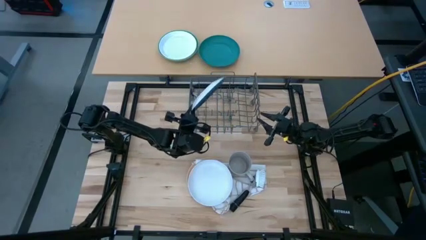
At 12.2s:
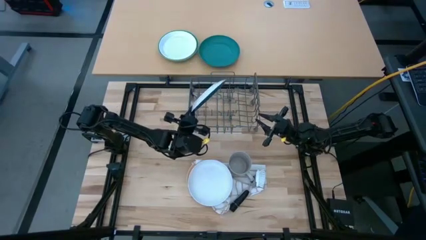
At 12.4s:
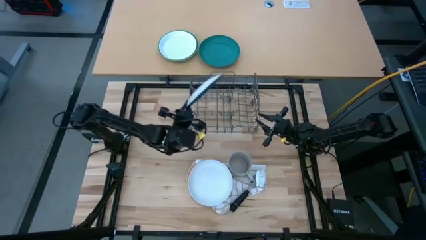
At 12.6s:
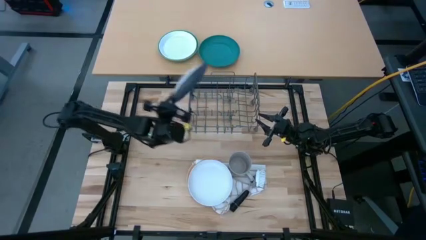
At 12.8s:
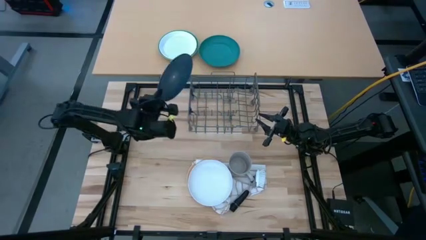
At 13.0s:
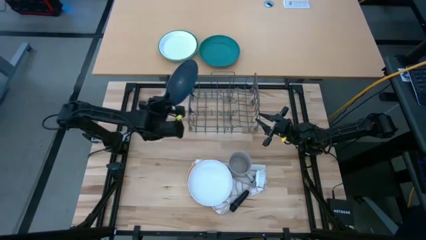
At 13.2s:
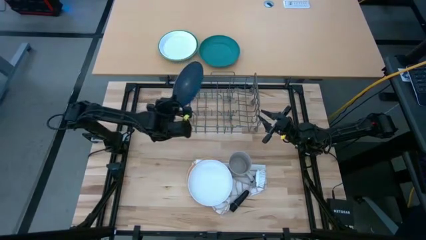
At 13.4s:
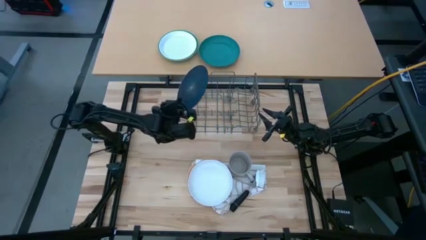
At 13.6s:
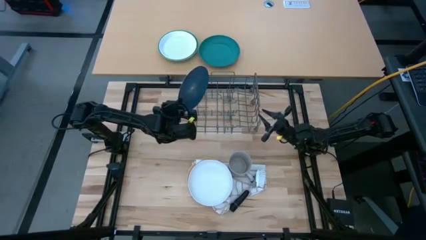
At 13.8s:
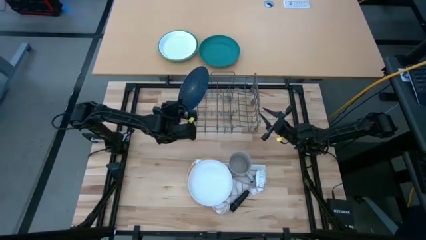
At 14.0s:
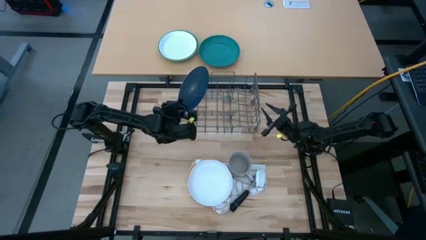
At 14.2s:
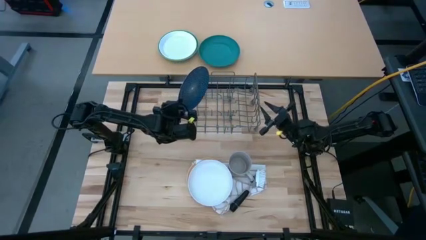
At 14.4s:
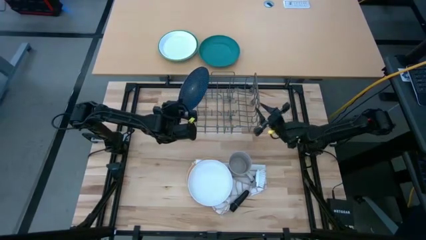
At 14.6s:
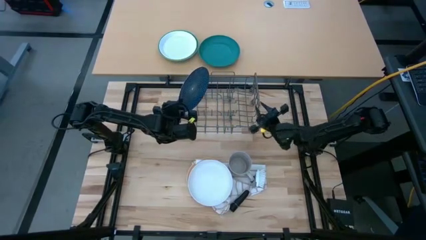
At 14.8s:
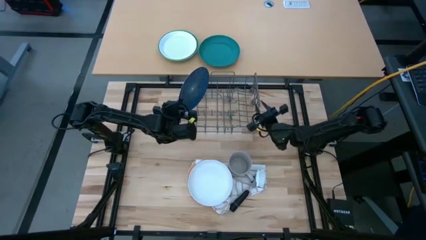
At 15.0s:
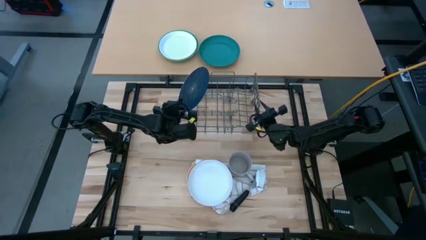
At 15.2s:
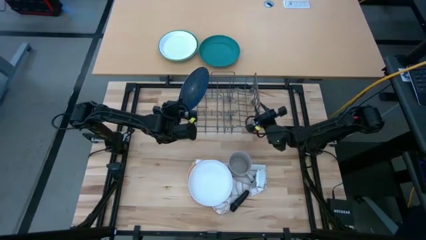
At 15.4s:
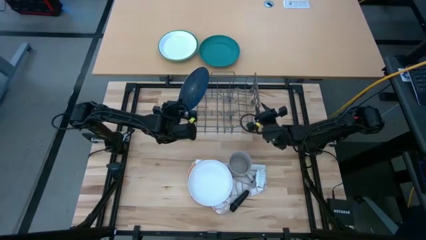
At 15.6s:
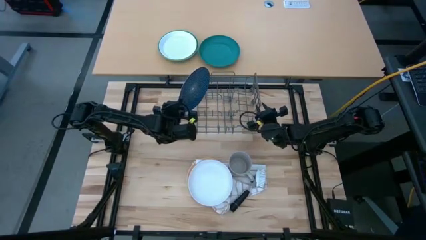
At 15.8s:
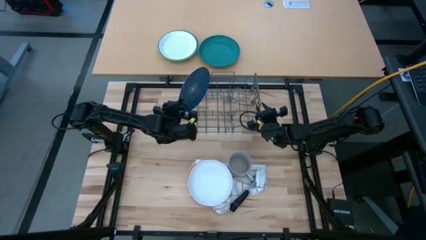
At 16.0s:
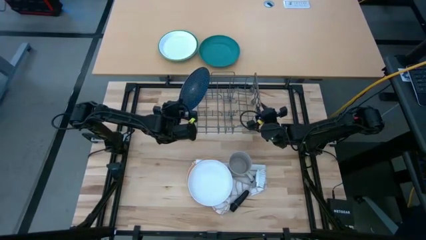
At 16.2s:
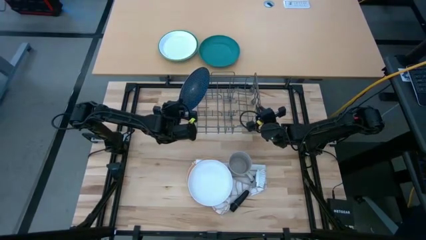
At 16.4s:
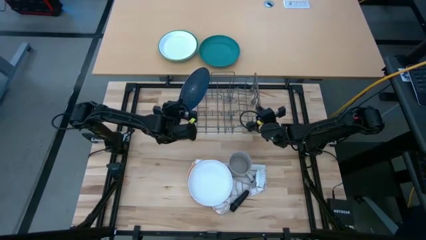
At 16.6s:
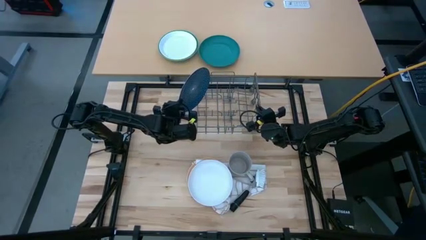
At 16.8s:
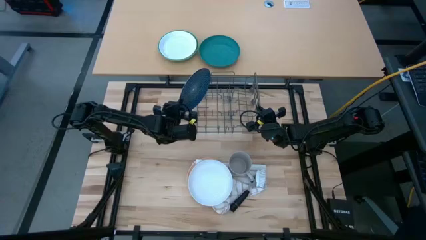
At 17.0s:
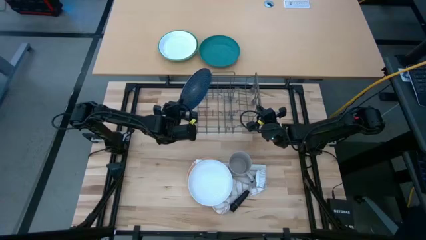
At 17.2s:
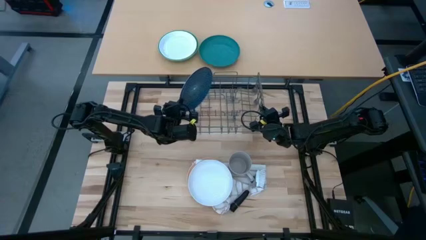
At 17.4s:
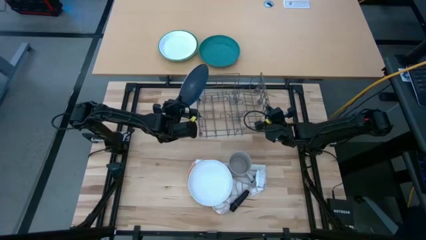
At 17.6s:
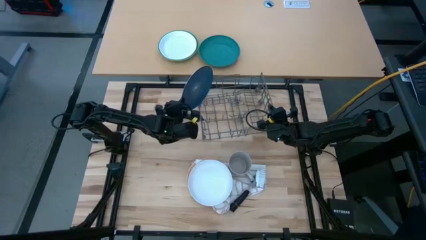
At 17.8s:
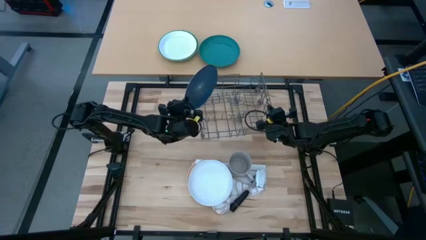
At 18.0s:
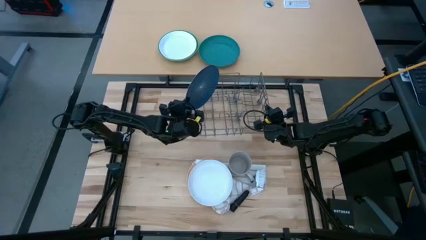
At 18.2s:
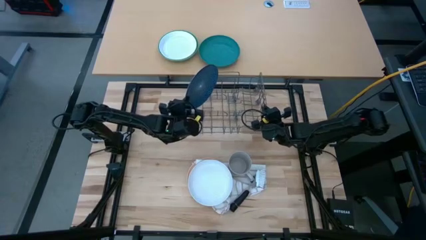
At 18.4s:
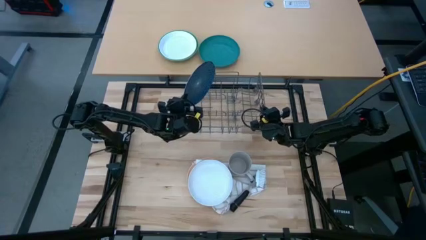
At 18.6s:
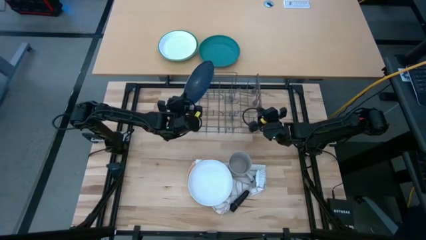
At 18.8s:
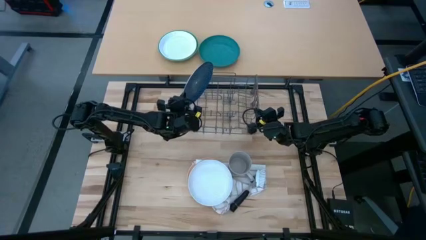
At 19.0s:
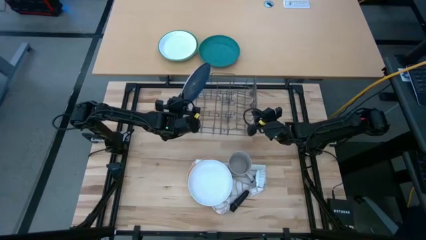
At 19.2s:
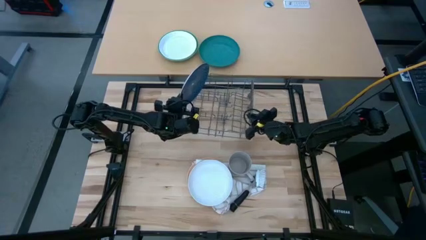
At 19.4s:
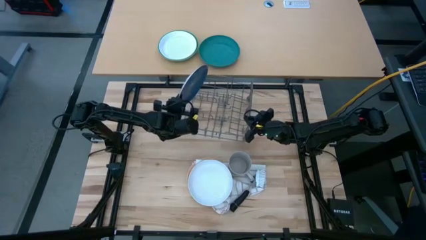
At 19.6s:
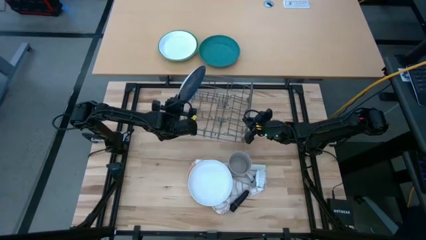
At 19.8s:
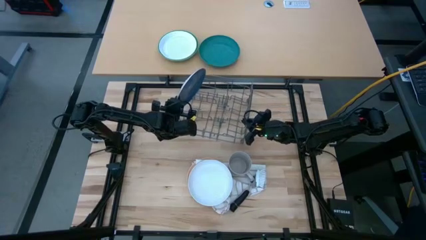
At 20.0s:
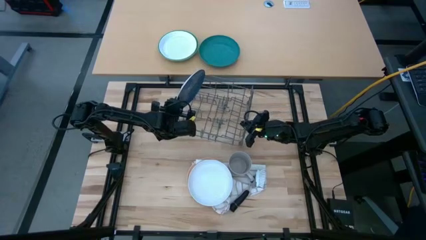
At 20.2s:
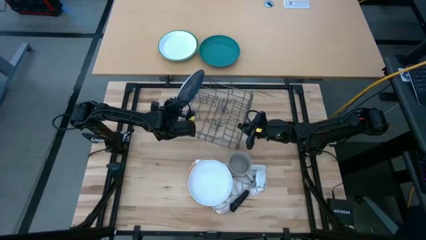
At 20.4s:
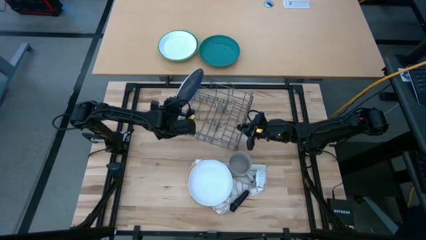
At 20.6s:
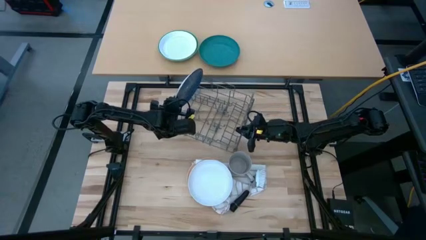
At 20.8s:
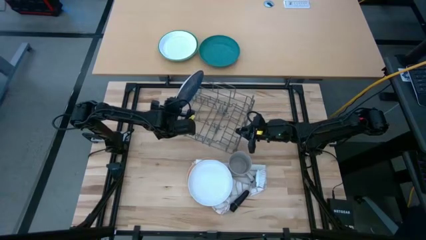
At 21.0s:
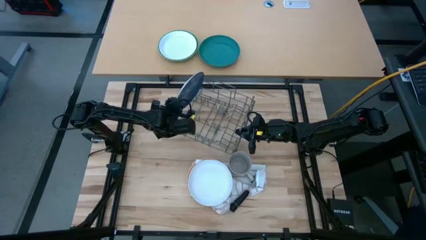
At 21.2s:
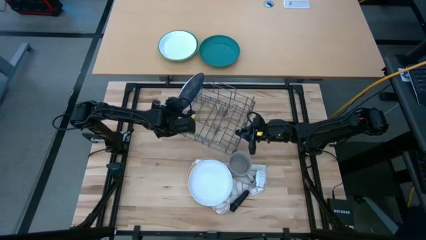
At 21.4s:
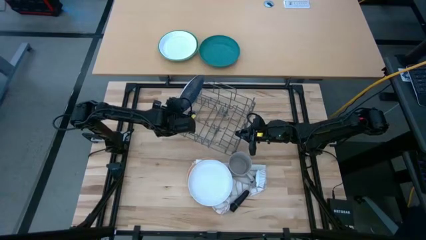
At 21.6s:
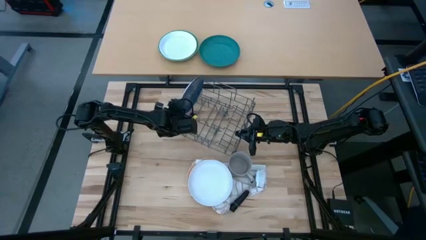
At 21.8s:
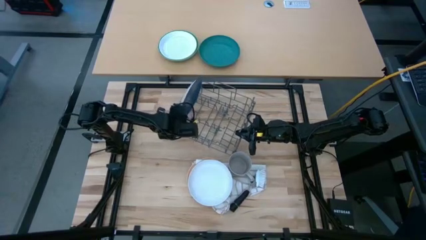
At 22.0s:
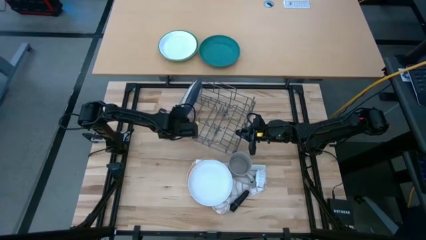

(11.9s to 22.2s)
Task: Sort dishes
Put the blue plate into the dish rack

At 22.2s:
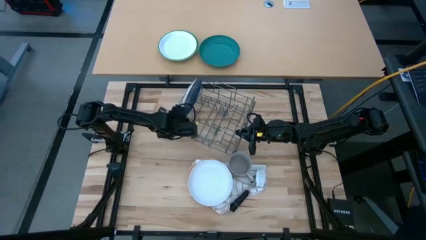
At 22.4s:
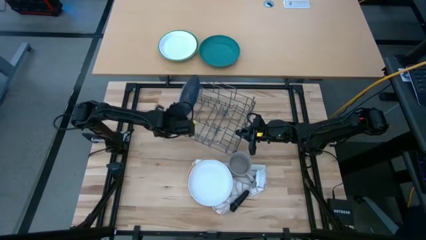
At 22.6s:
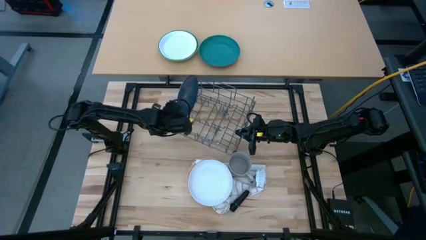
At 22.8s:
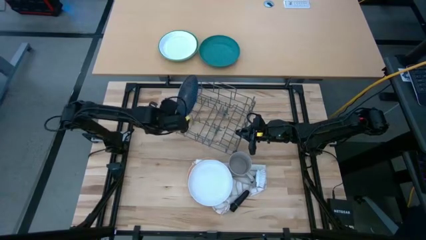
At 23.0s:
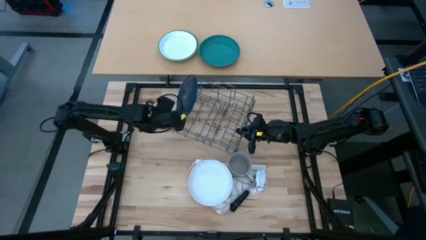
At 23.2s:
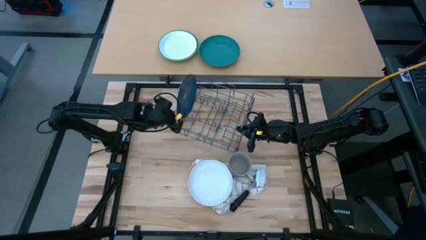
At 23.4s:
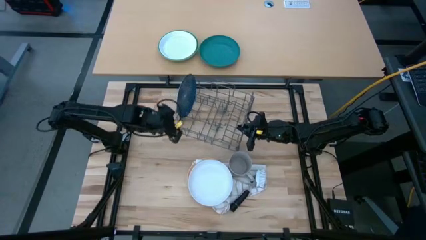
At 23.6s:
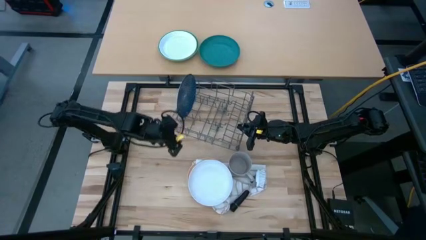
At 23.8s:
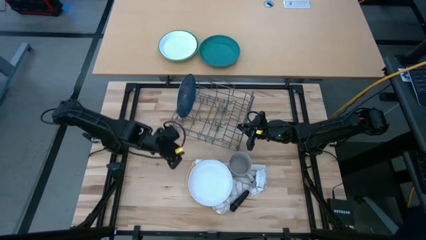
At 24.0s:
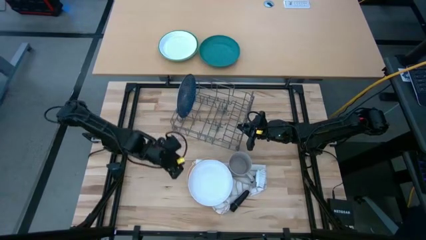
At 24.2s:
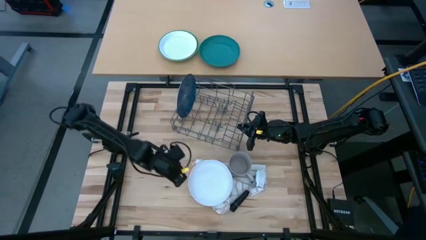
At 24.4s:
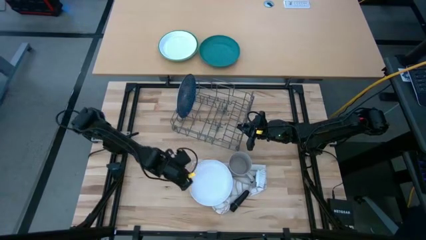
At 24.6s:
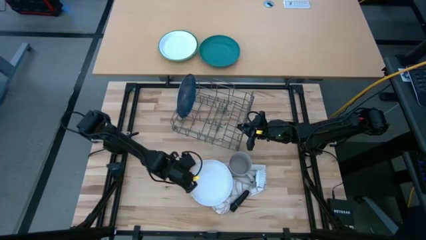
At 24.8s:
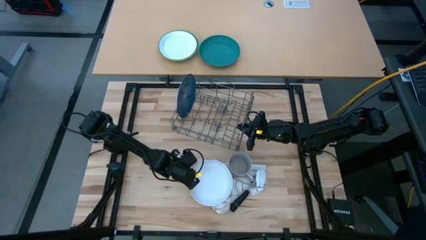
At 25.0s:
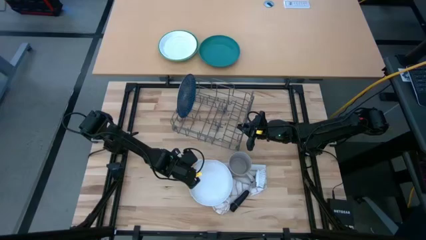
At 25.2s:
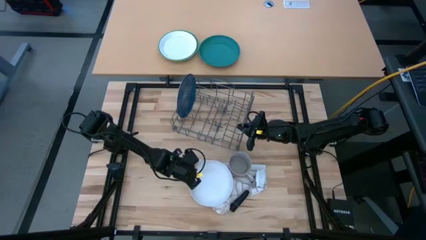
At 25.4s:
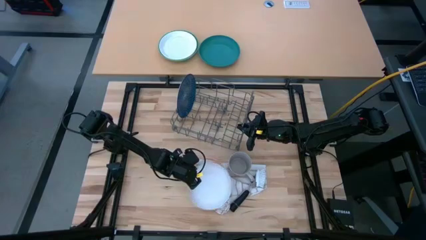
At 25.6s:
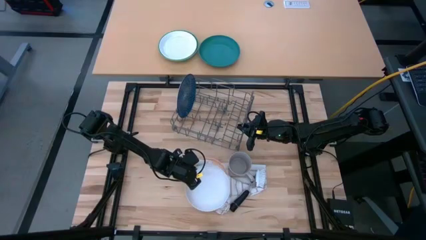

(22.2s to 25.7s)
Put the white plate into the dish rack

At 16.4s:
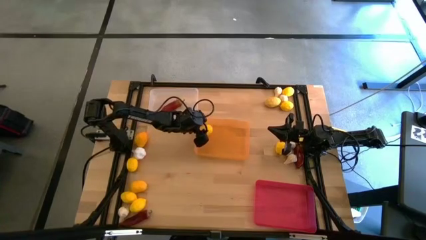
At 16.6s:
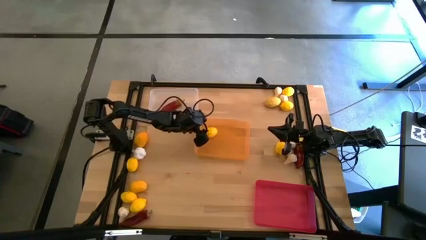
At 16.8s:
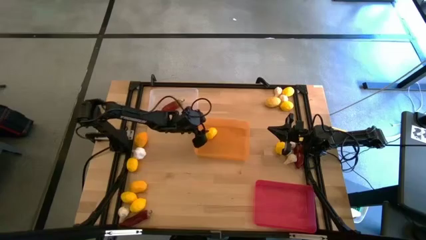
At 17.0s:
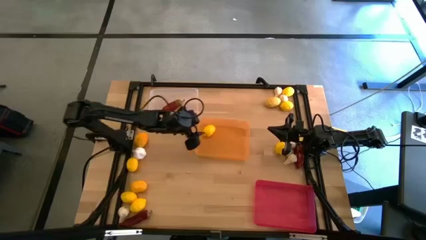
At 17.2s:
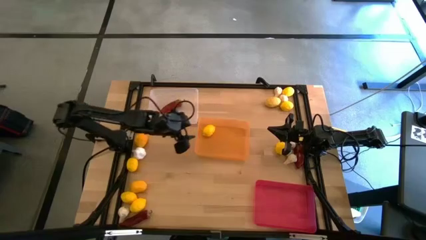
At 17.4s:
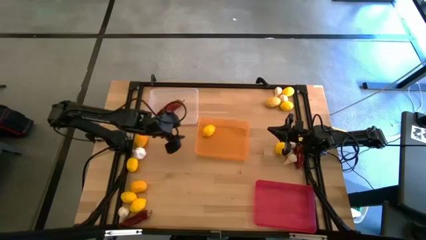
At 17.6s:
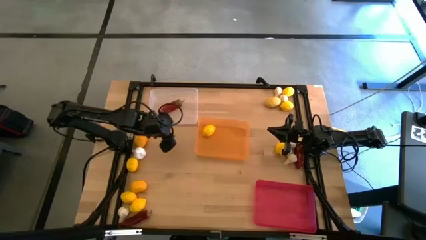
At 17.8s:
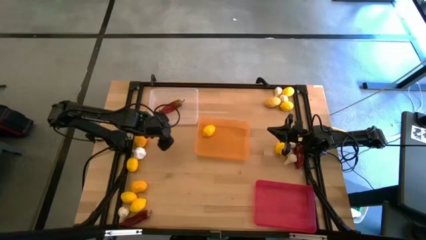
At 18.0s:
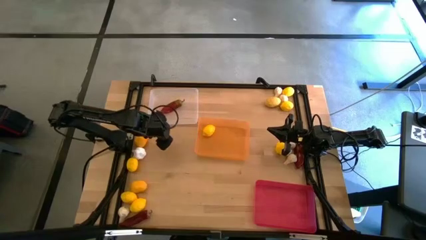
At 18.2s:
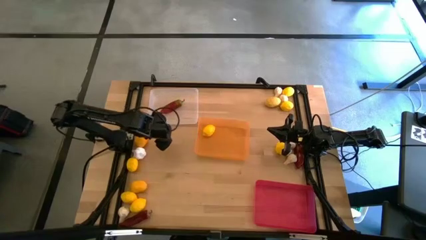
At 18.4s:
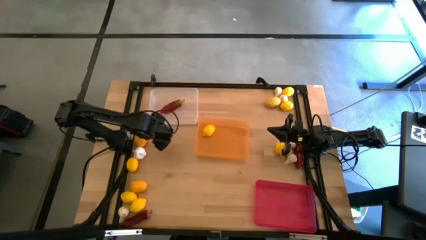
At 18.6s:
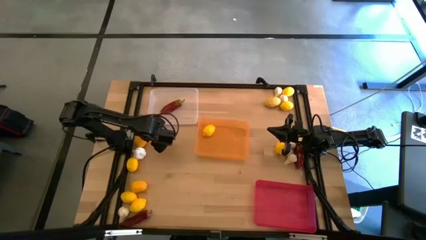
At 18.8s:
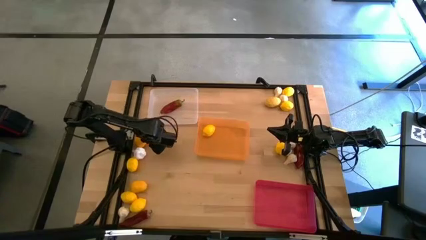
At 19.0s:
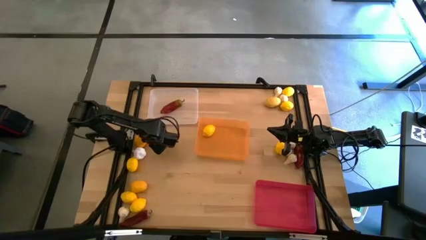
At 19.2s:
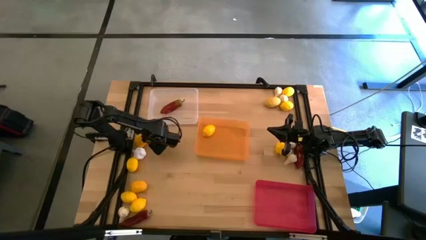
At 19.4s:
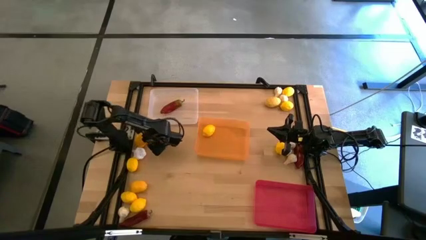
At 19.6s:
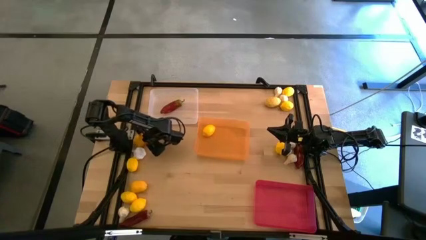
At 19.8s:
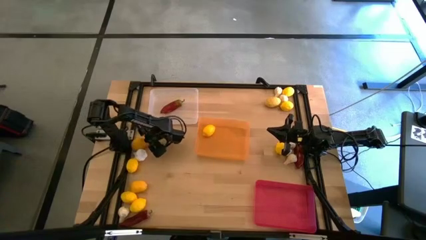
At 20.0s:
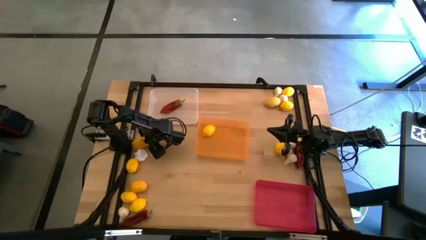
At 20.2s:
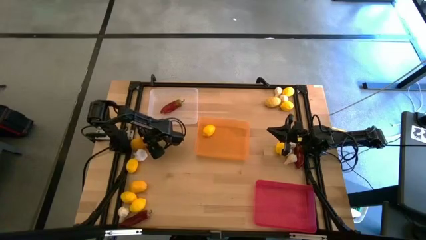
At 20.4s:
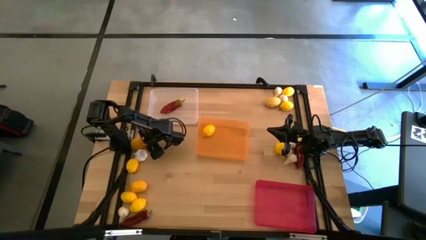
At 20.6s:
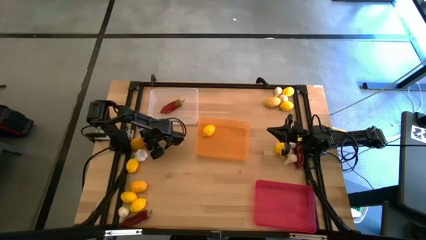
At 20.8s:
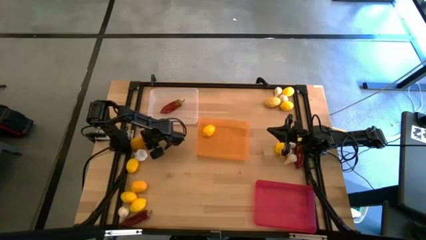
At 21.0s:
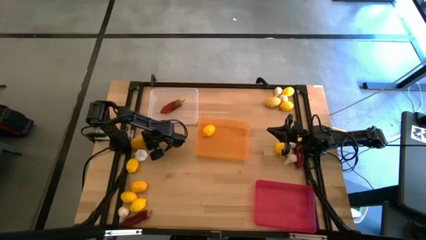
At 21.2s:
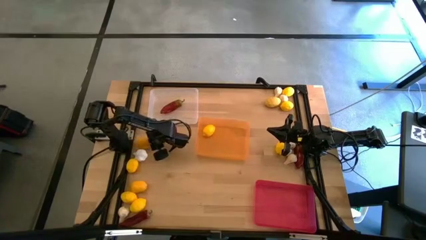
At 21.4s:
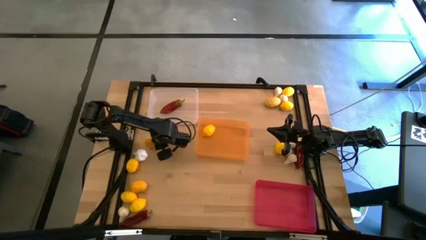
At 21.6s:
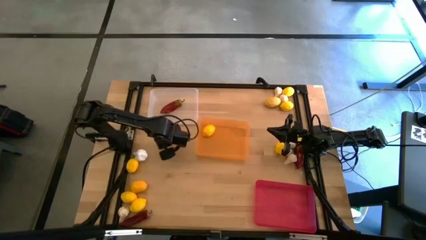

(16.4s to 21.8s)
Task: Sort produce into baskets
Put the lemon into the orange bin
